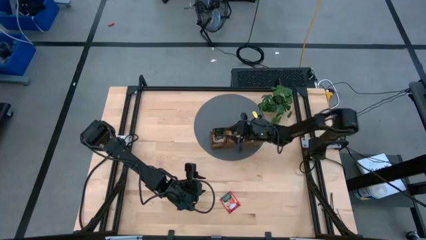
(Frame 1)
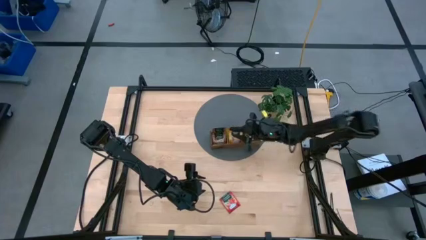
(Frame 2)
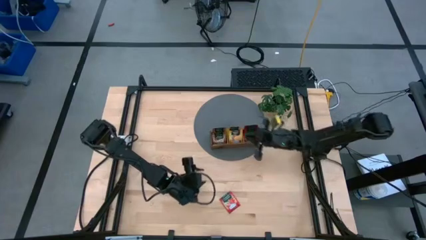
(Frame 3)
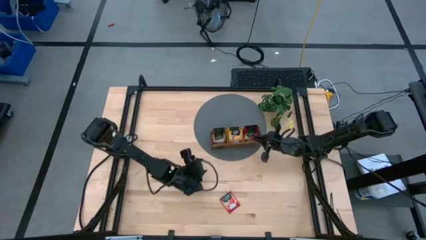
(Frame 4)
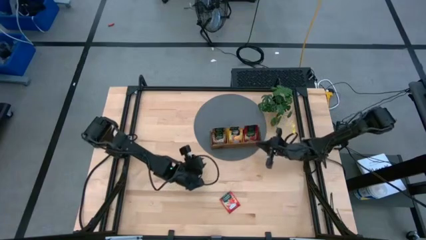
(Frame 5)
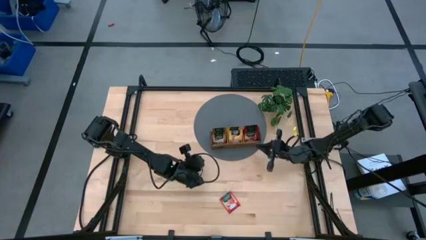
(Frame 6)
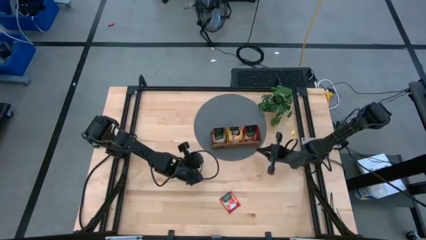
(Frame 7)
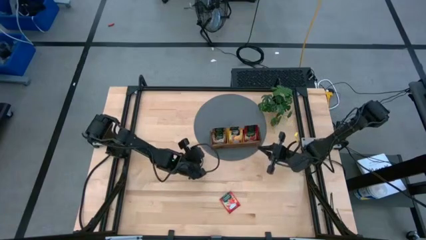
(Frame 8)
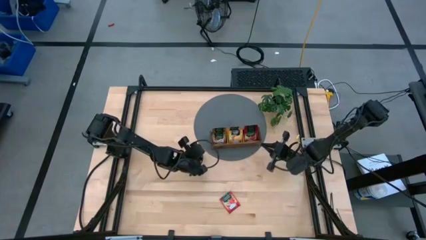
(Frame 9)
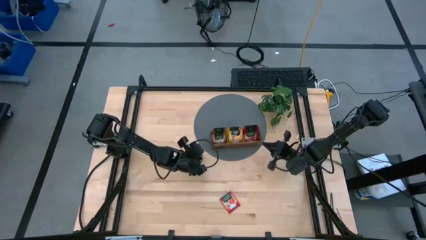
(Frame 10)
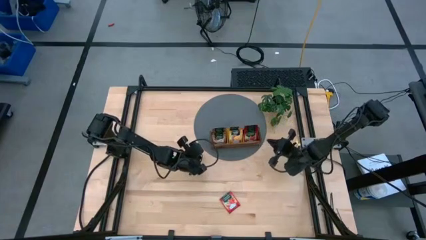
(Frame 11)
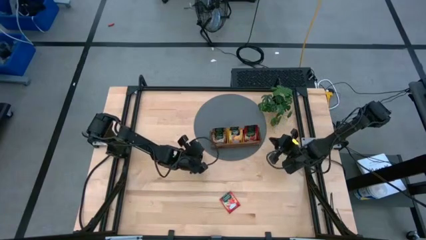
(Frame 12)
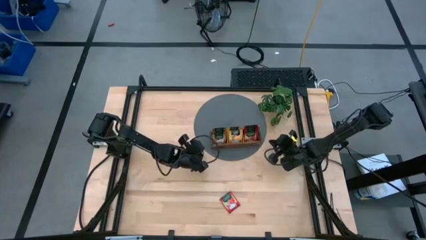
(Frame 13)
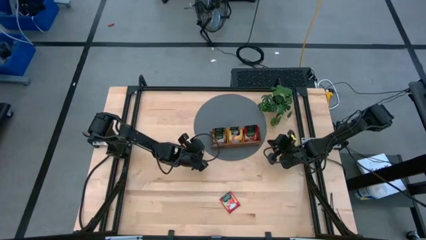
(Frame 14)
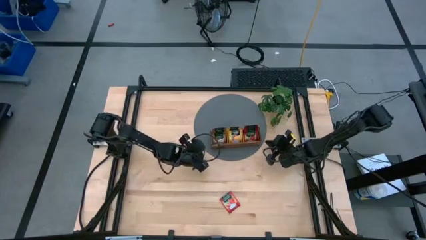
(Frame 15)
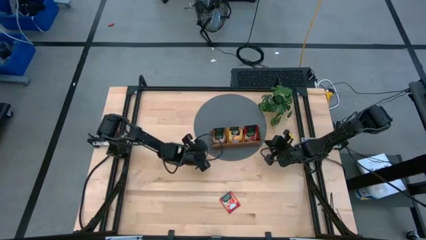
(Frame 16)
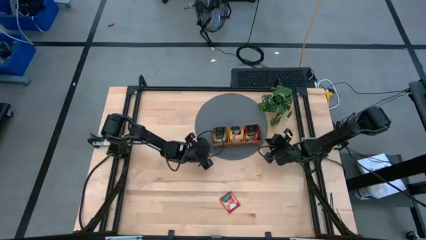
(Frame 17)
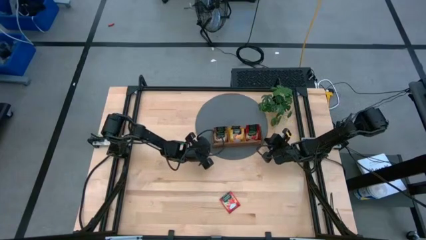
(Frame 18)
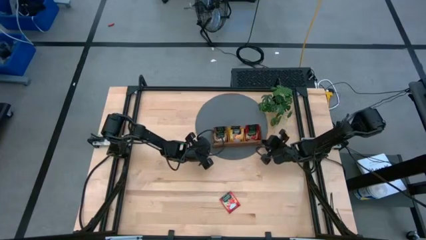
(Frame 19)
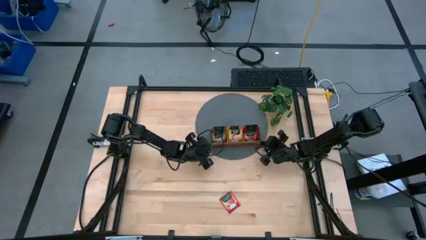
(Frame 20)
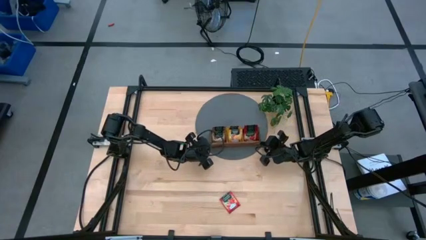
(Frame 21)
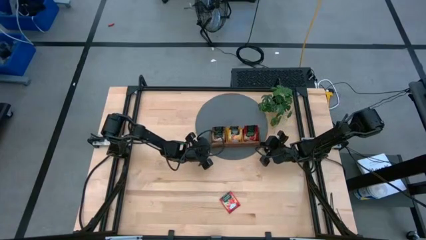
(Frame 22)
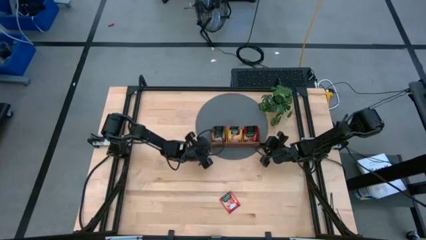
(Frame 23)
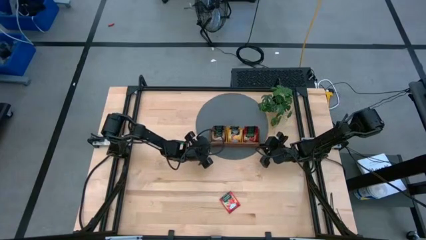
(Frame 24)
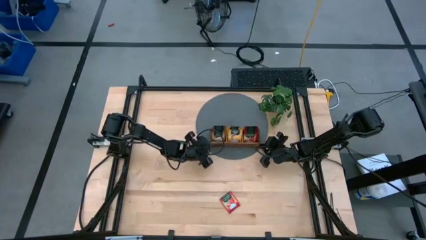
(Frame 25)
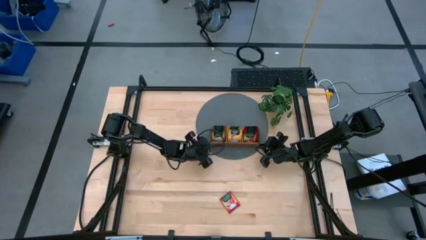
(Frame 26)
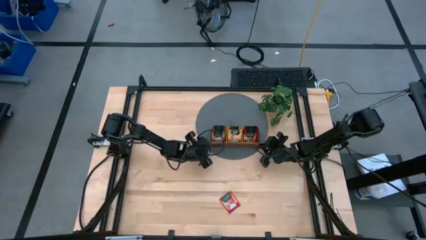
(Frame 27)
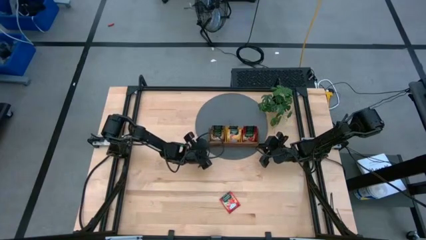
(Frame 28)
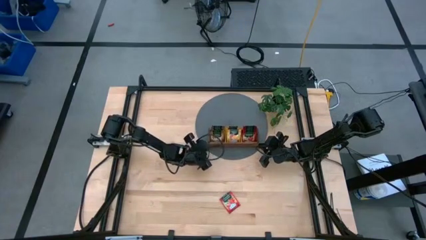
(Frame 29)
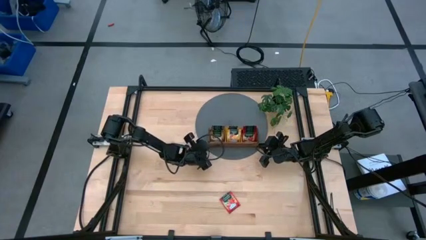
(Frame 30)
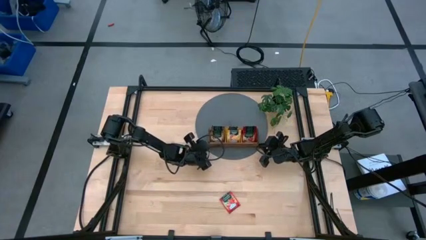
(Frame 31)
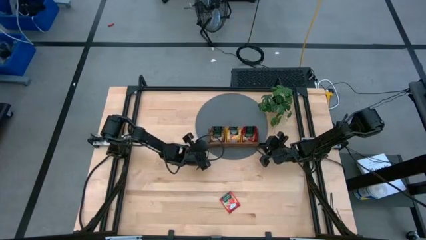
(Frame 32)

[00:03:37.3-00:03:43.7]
Task: Pick & Place Tea
Adjust the wooden organizer on the table to align the position

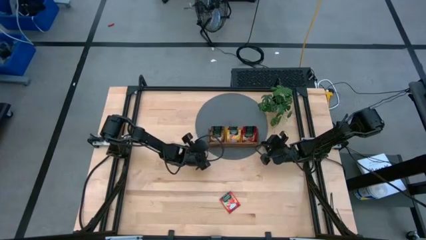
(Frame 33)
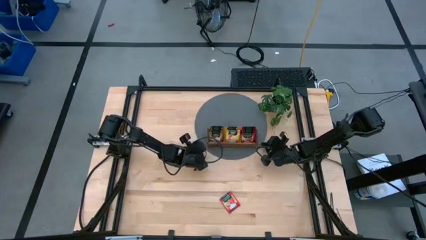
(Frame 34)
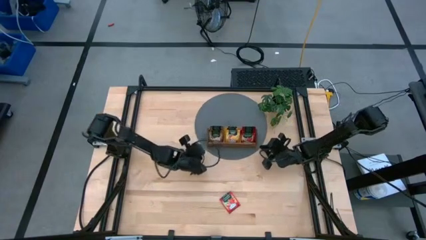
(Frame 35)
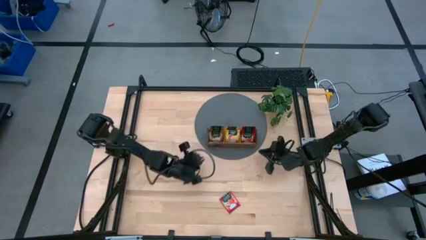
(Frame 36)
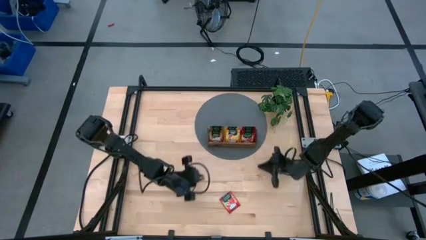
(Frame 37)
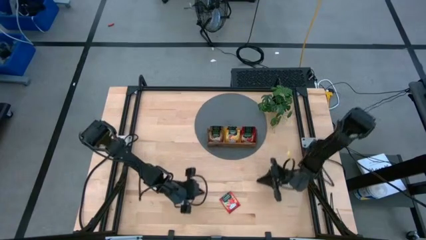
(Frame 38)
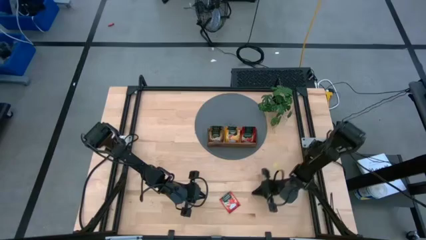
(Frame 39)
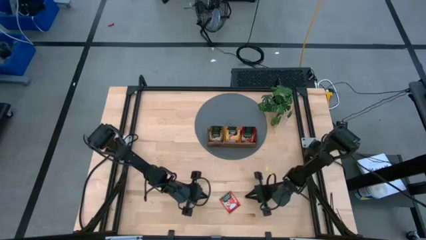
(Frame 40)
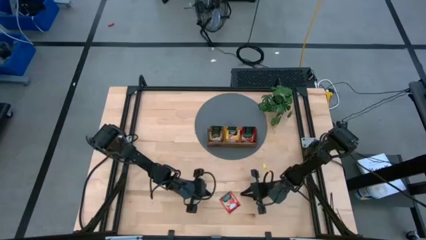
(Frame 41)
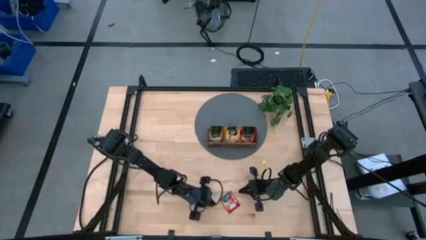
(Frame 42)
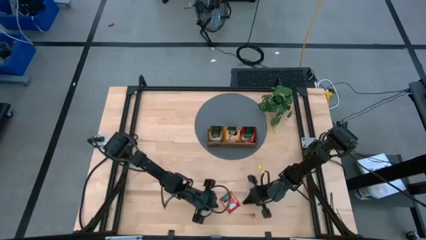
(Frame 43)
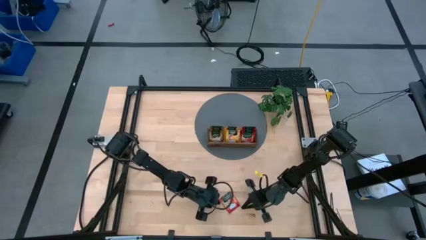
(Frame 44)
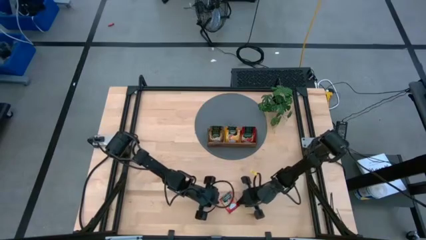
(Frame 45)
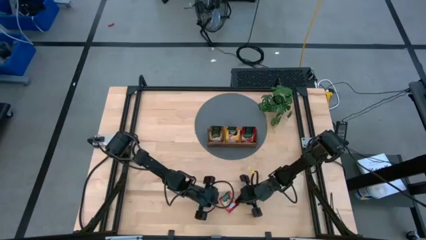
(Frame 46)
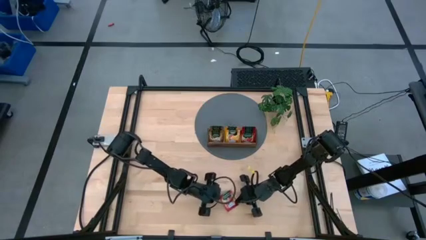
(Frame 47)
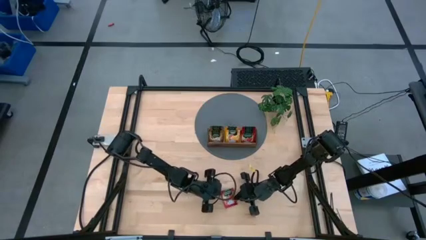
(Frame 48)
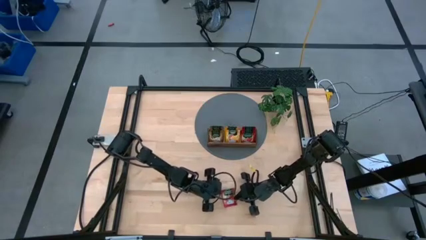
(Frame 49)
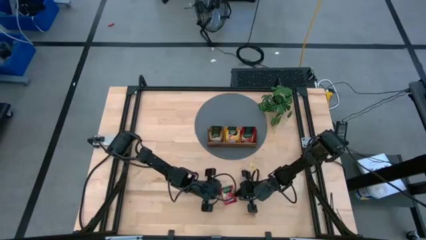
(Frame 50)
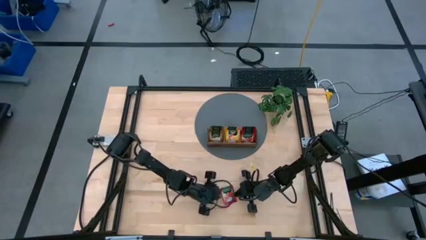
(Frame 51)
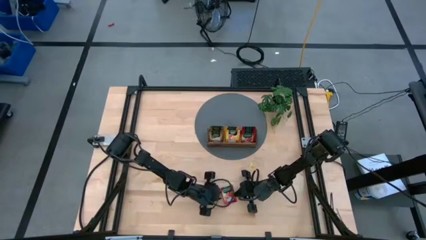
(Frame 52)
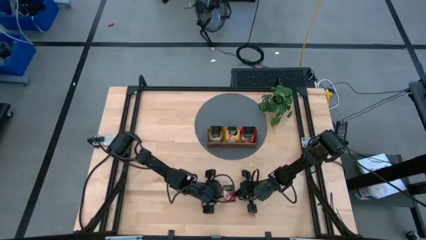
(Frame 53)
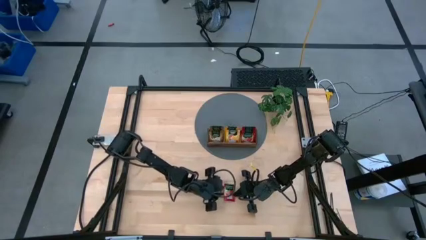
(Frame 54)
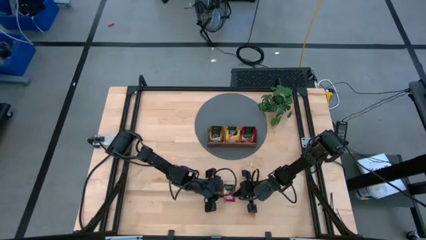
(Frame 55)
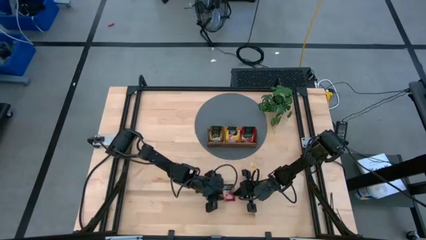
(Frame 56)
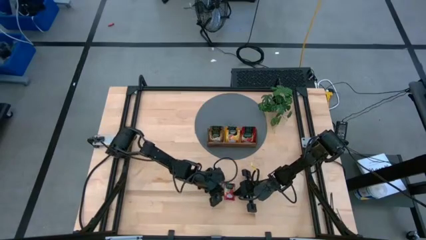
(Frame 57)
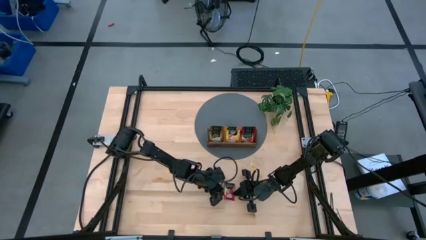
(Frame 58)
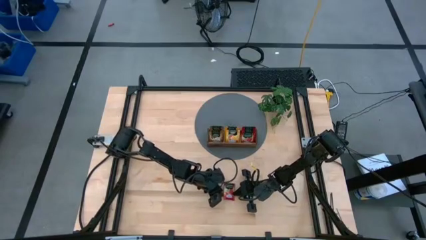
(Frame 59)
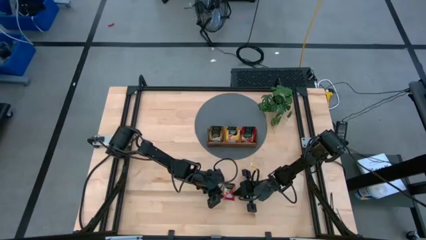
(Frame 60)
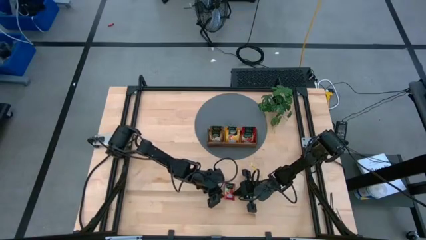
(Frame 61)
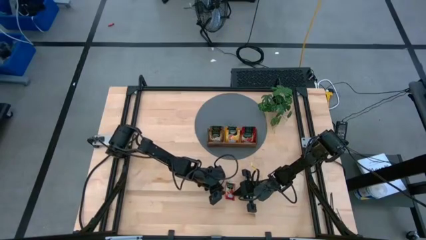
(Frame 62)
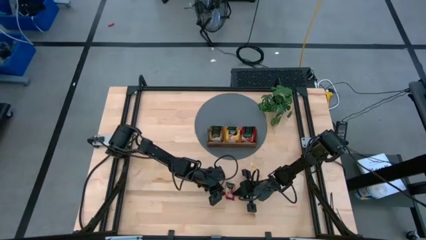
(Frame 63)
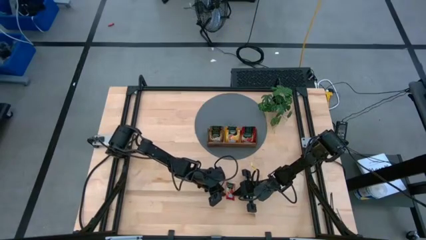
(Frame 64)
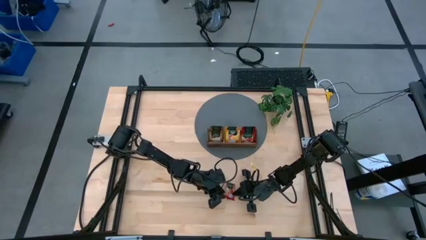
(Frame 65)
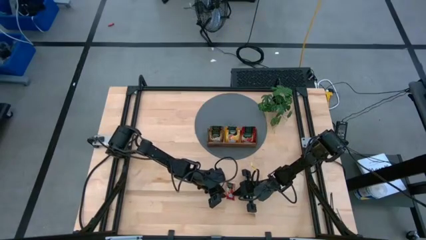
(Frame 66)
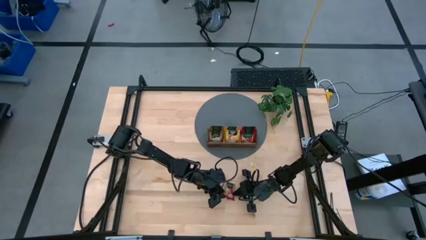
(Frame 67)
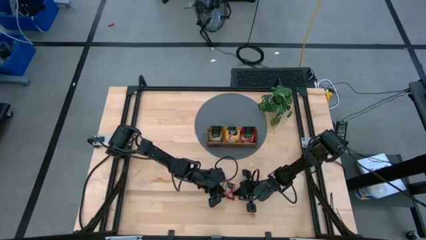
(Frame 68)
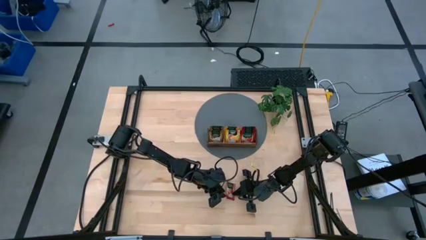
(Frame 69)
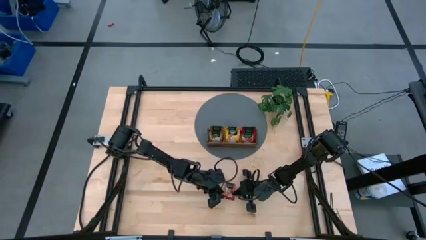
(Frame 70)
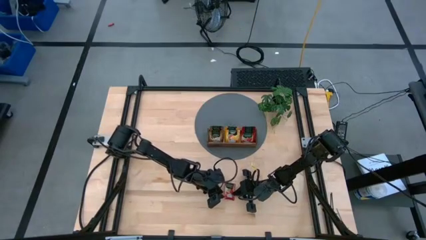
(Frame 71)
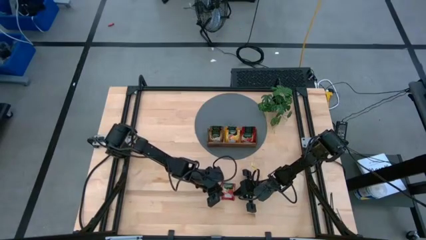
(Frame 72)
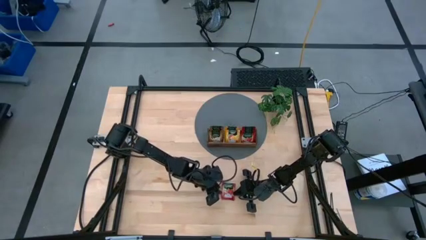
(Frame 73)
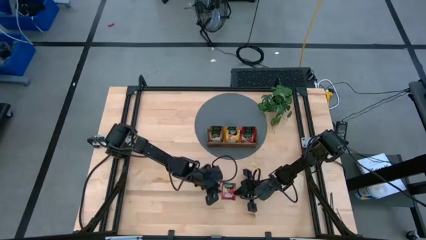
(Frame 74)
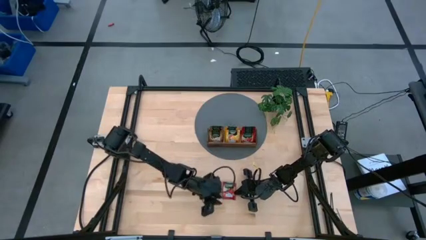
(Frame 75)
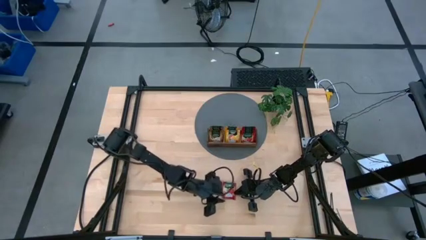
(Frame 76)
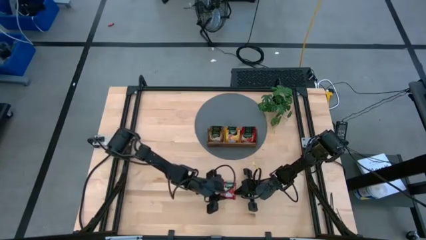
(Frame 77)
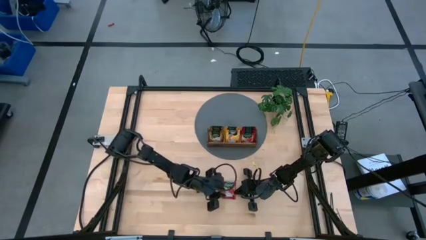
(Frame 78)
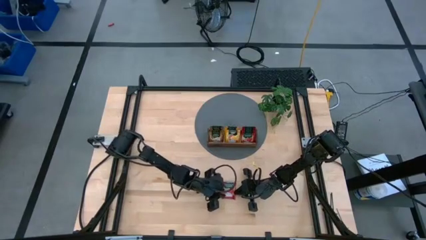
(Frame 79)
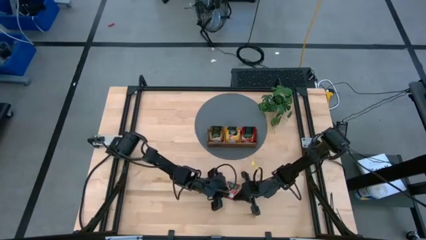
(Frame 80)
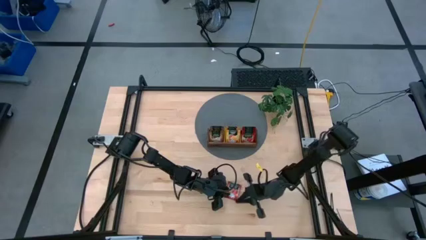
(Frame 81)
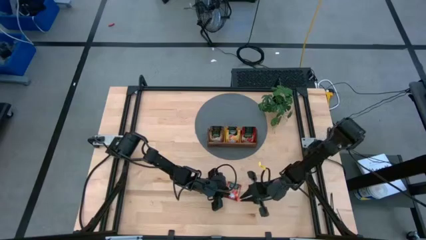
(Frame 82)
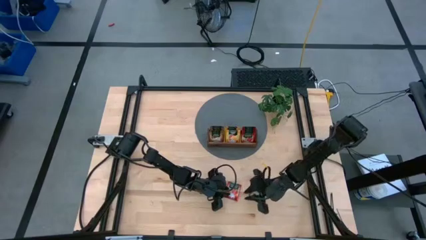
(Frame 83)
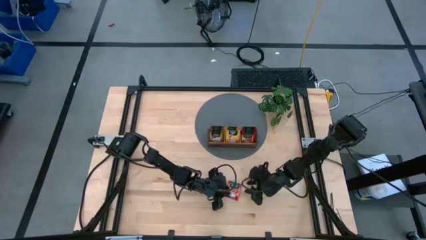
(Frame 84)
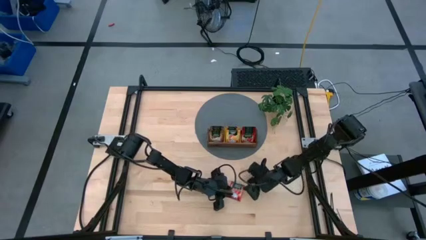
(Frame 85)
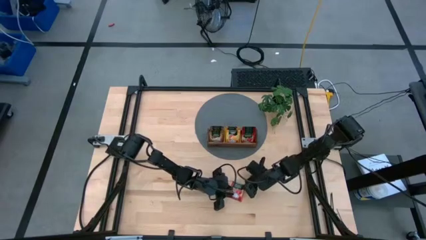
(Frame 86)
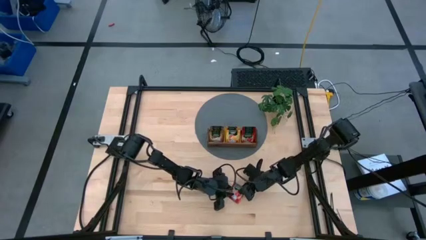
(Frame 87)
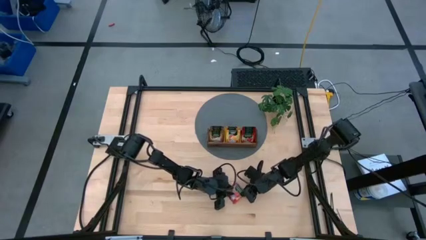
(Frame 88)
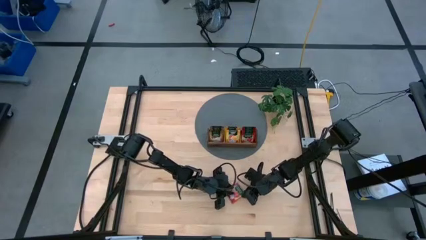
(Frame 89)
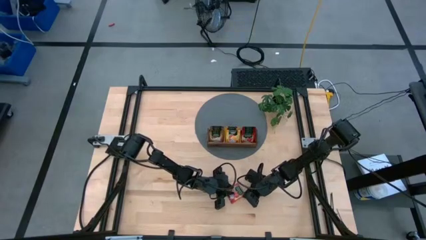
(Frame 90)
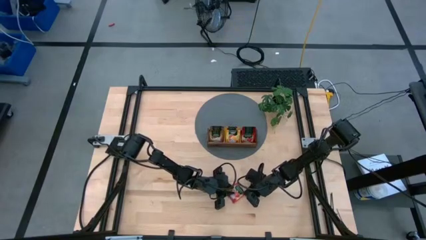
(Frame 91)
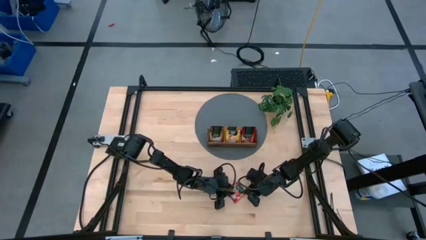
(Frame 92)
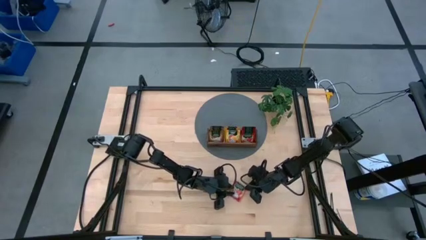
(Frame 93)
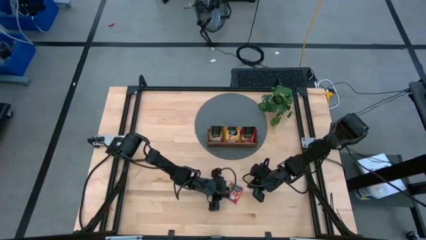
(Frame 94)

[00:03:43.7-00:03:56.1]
Put the red tea packet into the right section of the wooden organizer
